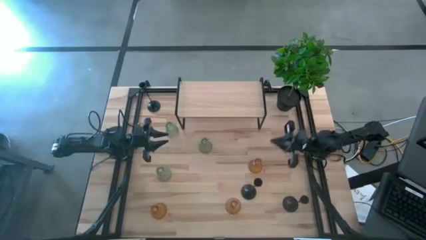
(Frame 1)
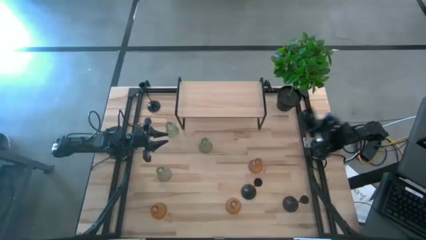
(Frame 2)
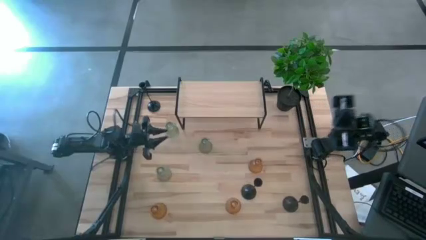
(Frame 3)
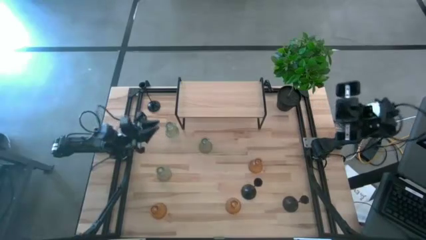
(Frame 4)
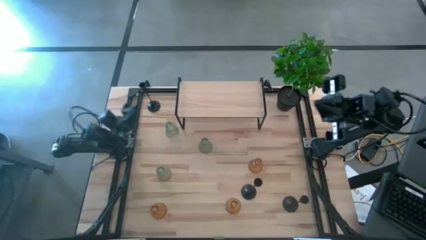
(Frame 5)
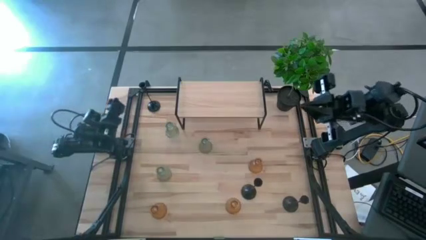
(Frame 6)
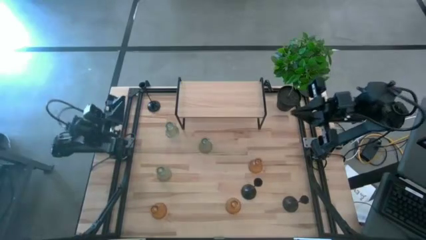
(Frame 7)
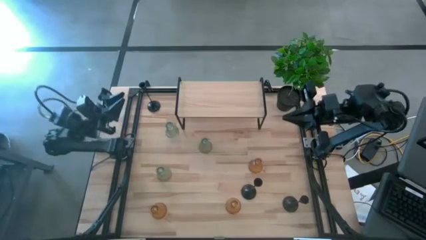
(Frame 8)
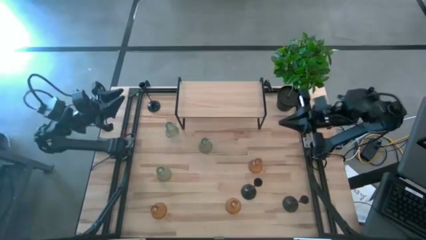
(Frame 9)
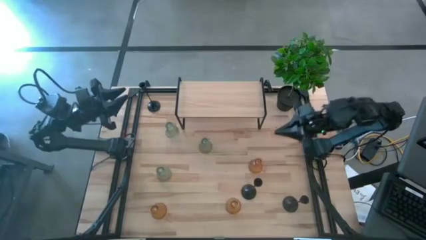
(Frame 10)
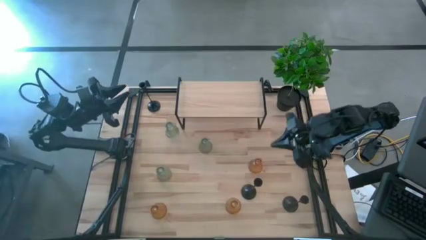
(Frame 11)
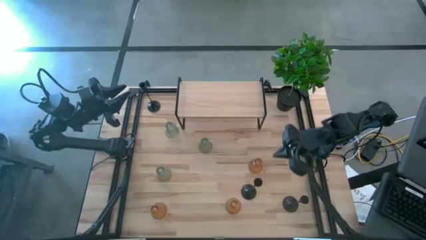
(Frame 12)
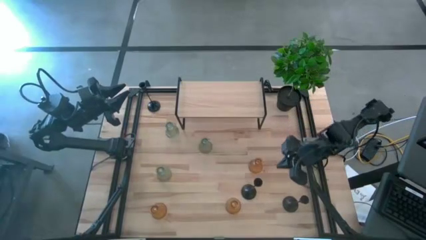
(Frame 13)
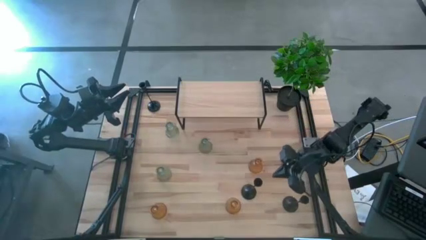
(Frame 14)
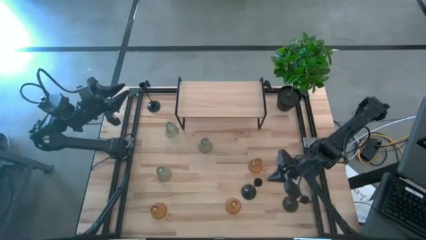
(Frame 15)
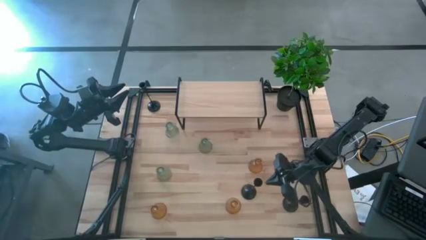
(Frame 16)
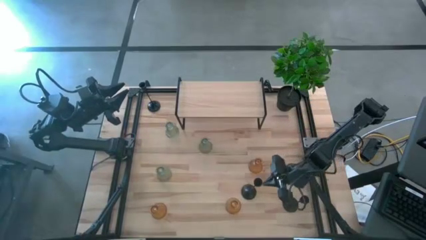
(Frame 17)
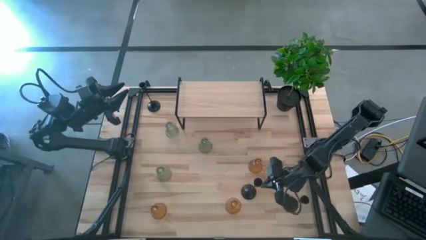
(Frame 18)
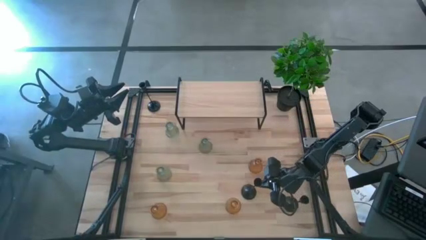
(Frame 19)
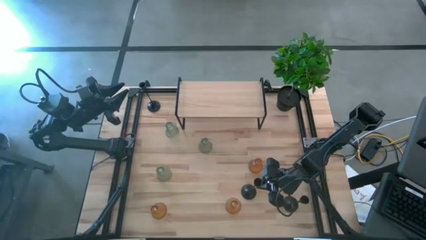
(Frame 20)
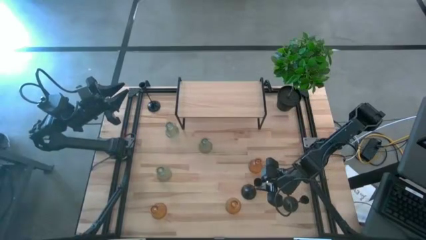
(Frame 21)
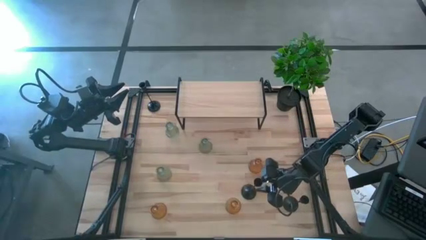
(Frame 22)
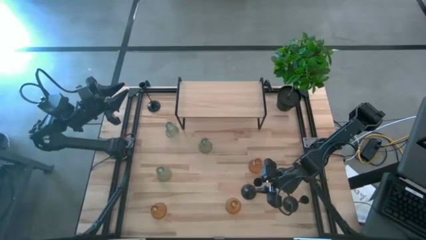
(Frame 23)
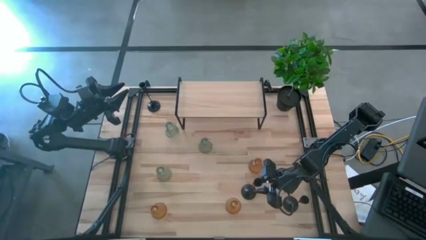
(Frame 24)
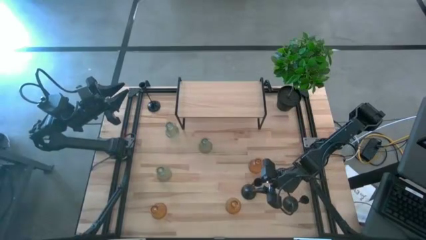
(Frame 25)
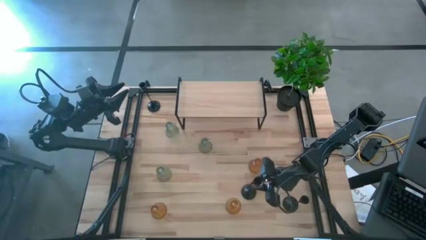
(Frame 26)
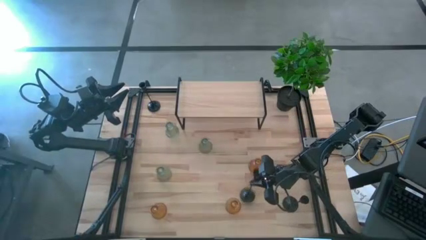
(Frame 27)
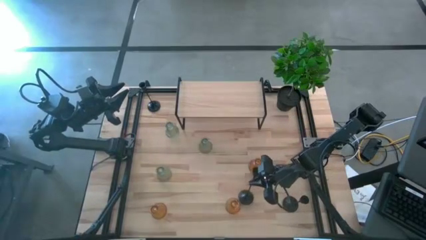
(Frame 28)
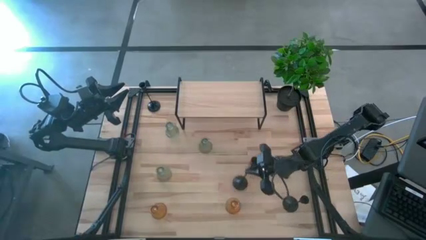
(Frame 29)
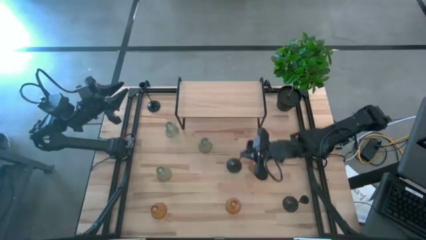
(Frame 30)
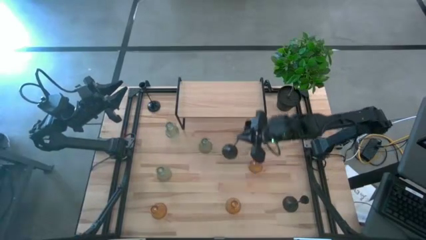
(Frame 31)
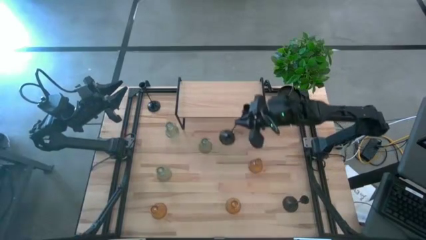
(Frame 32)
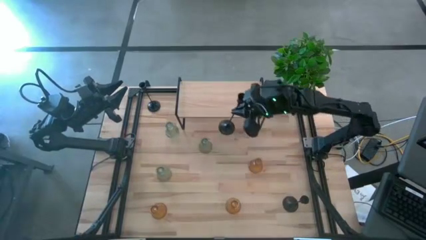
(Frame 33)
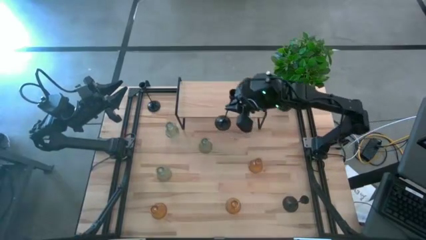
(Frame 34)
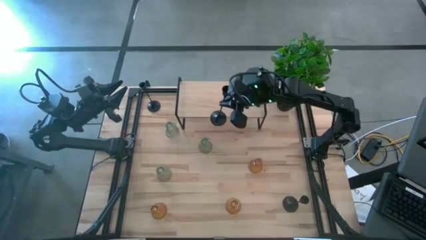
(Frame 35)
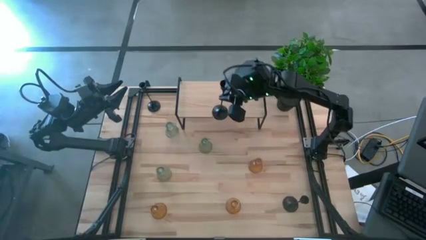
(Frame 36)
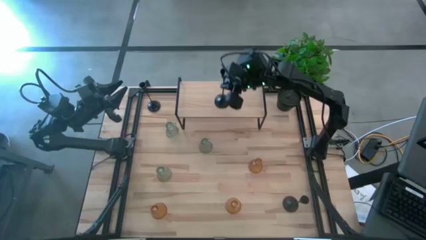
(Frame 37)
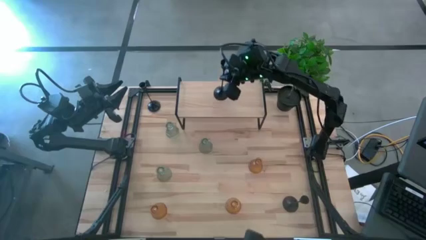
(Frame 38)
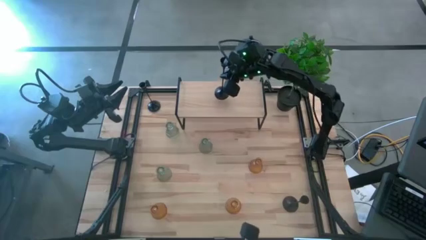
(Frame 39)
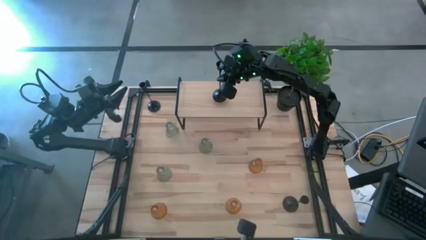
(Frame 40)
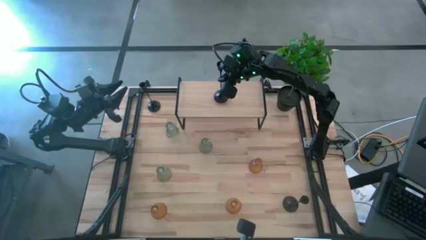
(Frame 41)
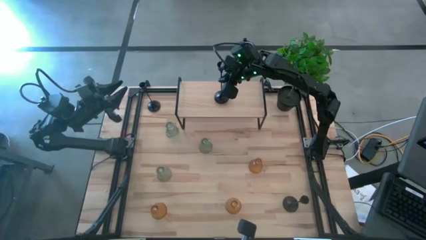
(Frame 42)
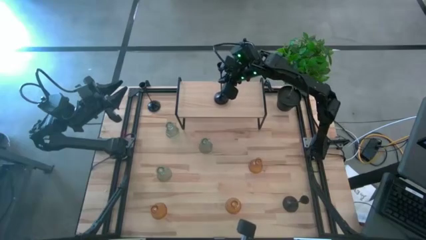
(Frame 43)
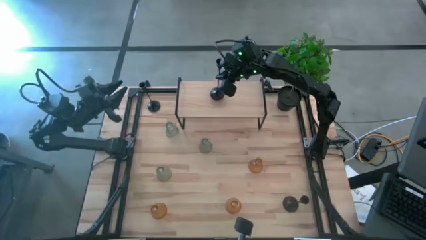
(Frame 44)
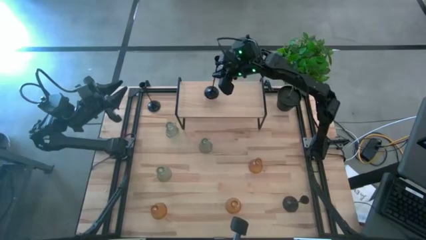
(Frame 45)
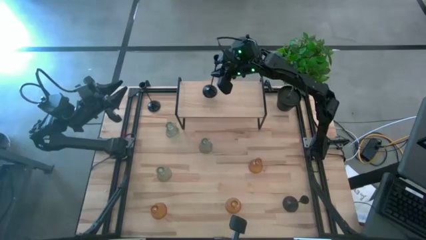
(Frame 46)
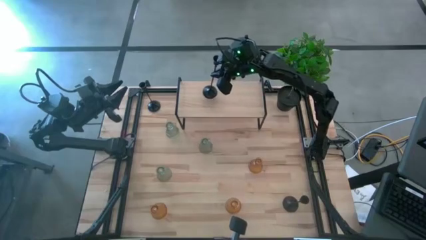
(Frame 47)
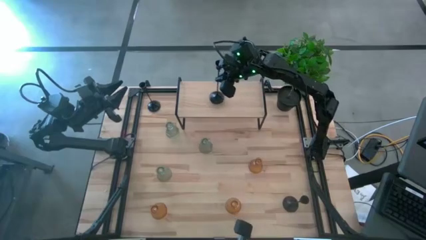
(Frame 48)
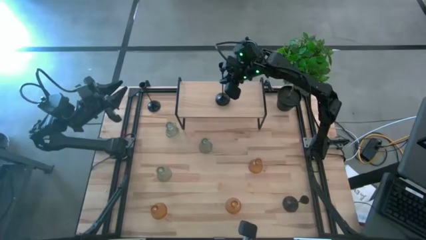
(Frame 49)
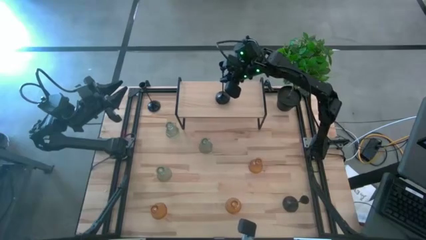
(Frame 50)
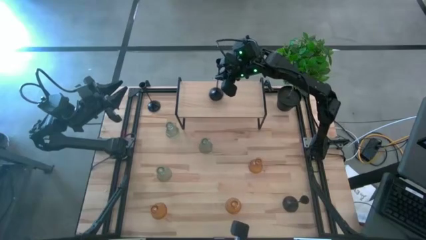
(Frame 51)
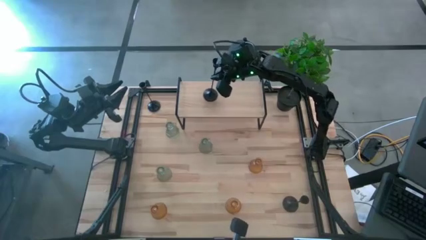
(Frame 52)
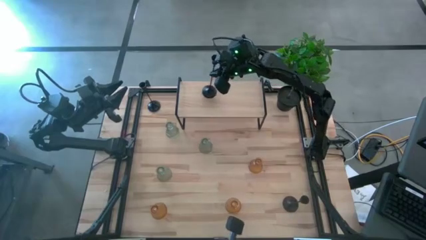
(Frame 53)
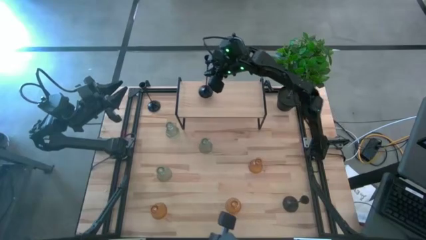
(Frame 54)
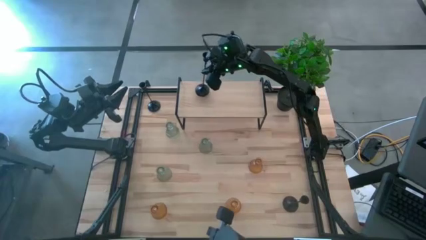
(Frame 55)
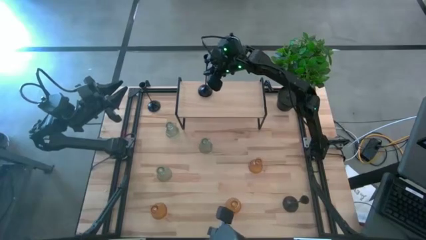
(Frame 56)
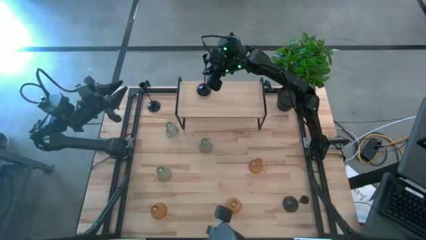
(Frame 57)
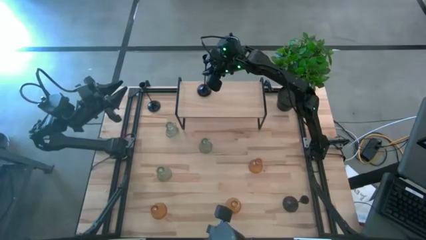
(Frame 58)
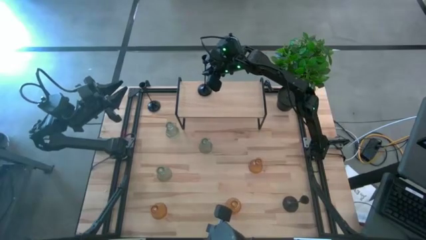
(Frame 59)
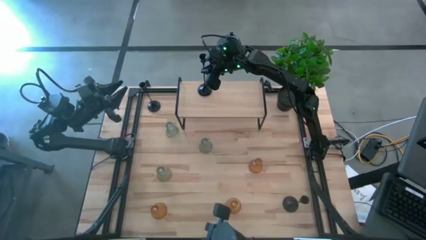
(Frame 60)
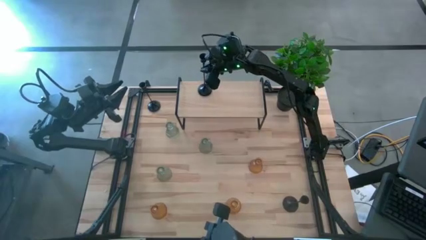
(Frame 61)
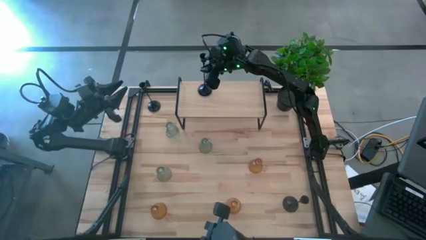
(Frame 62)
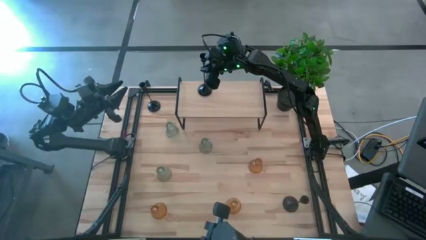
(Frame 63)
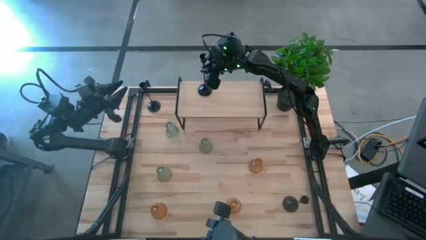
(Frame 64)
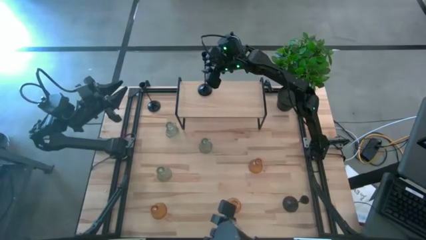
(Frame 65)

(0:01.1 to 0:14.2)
Task: Pick & Place candle stick holders
Put the bottom center black candle holder on the shelf
